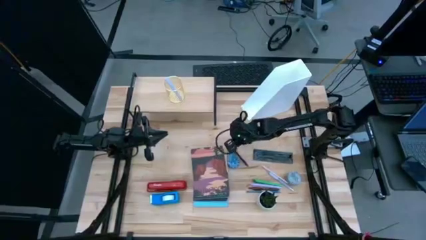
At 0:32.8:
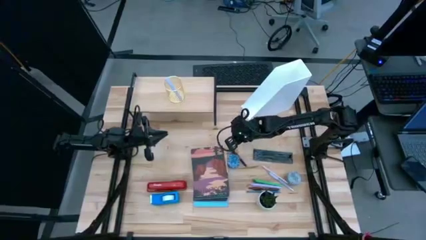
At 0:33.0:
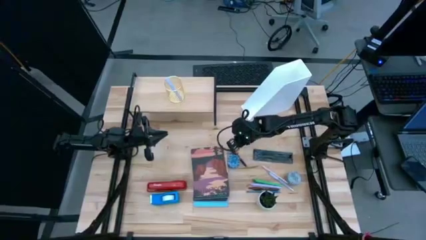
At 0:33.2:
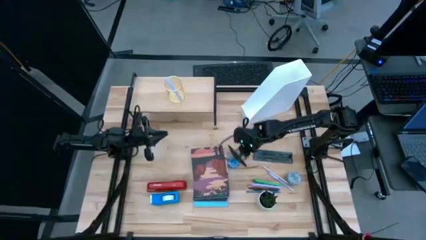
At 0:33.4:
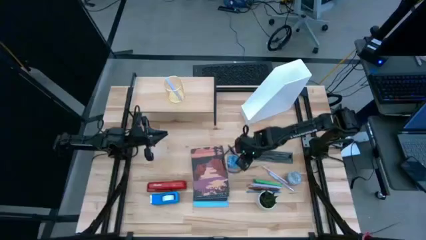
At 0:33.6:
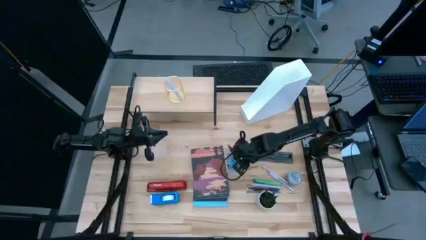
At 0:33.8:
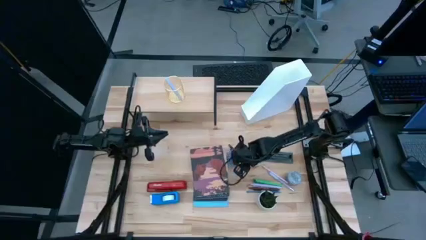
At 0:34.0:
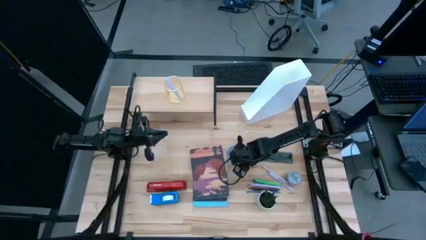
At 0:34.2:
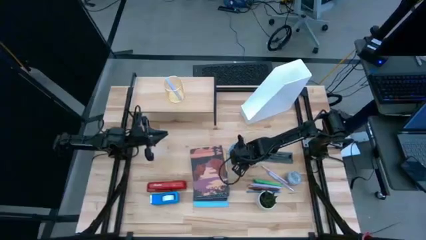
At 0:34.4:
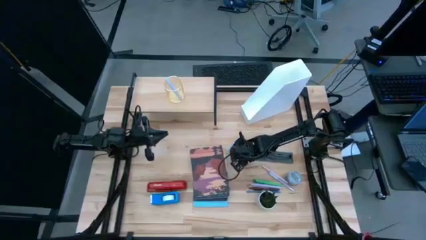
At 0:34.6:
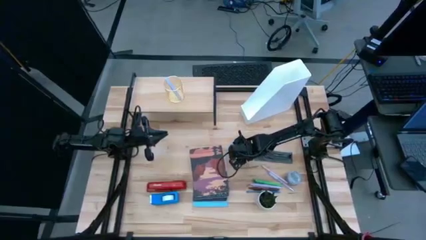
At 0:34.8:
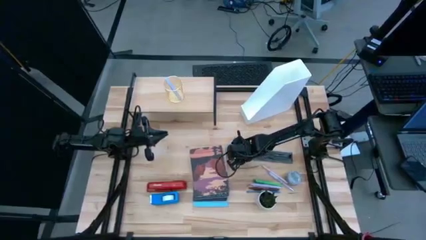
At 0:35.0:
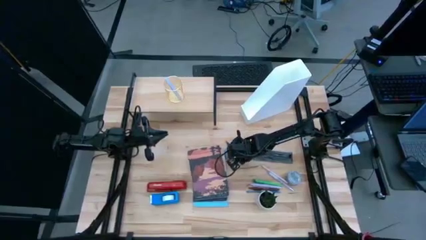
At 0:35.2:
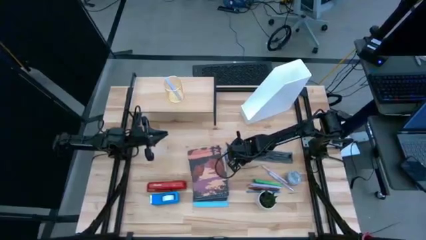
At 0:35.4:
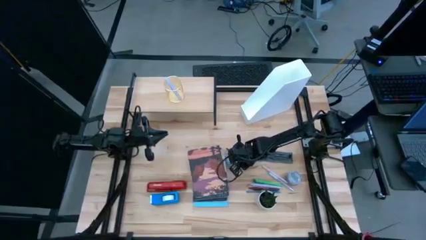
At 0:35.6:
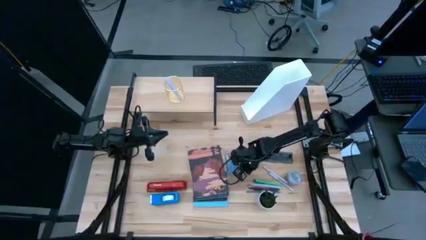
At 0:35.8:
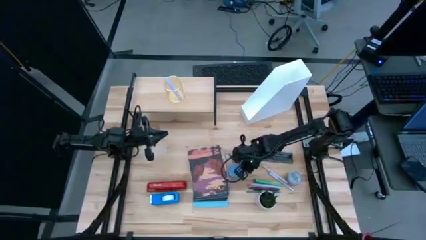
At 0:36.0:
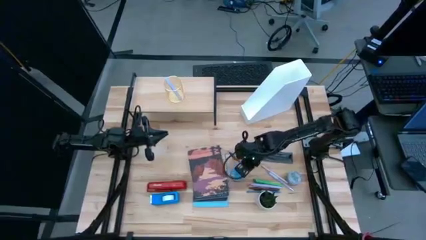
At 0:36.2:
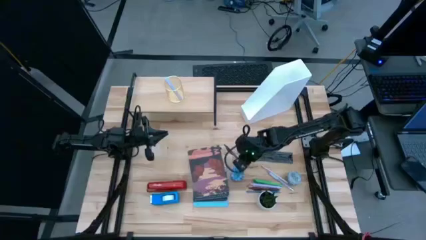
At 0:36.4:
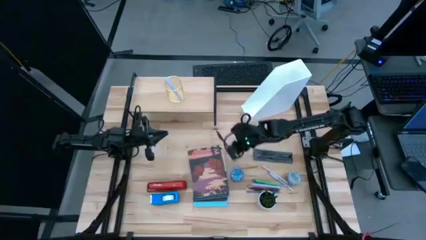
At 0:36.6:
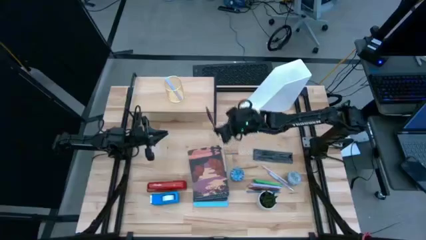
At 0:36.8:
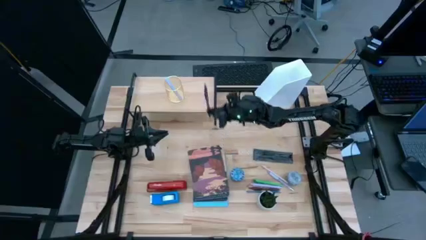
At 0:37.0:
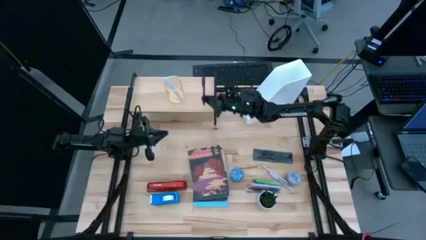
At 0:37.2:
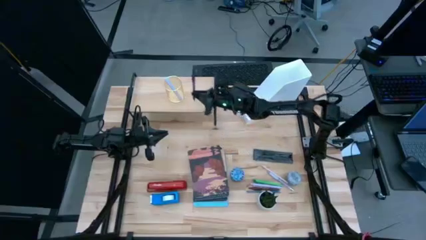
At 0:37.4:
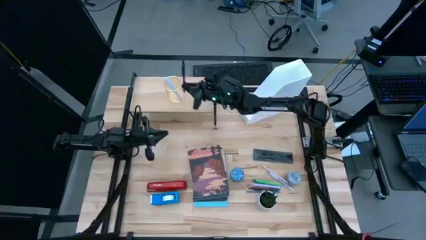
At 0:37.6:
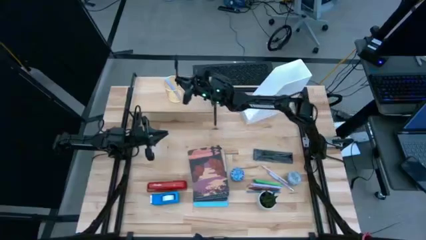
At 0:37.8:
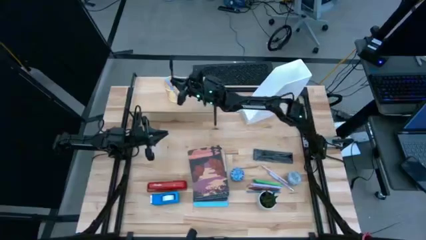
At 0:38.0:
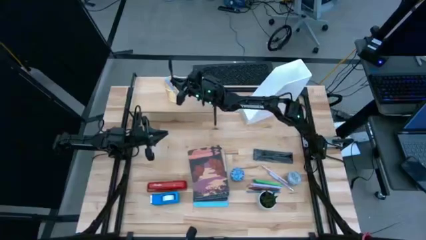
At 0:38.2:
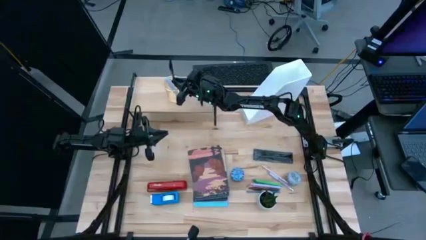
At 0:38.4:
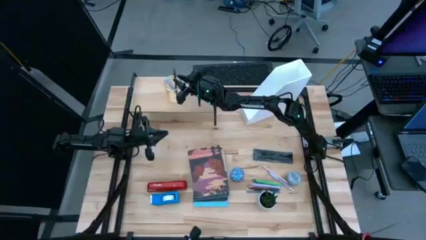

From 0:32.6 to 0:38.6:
Task: Stock shelves
Put the purple pen into the gold pen holder on the shelf

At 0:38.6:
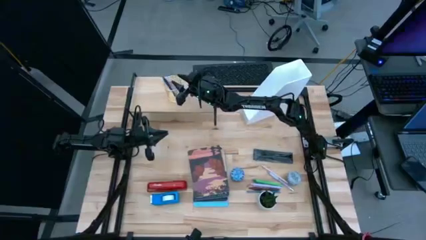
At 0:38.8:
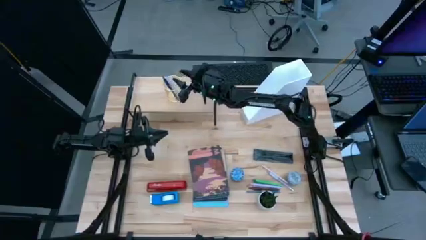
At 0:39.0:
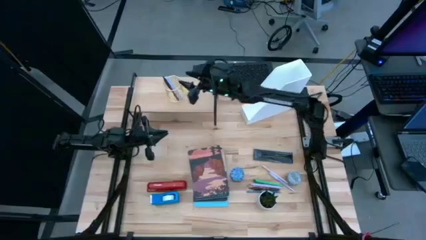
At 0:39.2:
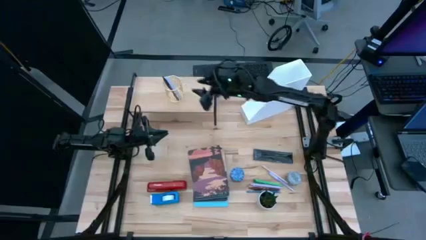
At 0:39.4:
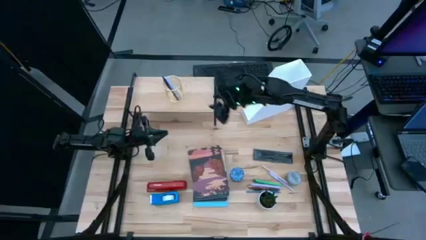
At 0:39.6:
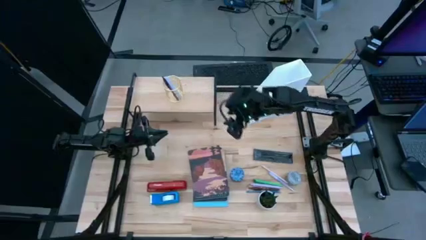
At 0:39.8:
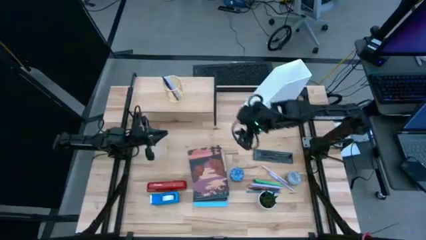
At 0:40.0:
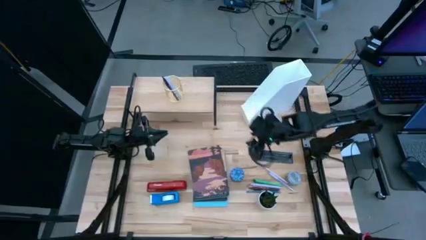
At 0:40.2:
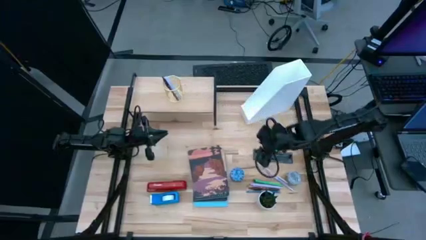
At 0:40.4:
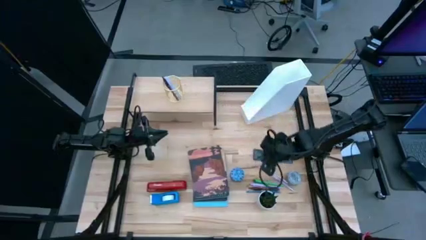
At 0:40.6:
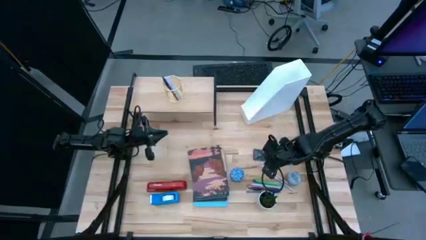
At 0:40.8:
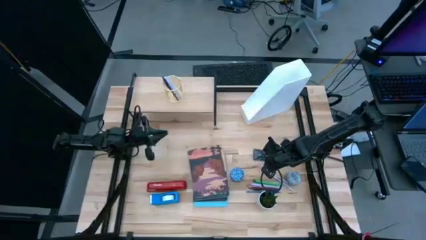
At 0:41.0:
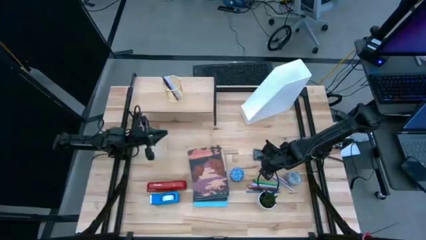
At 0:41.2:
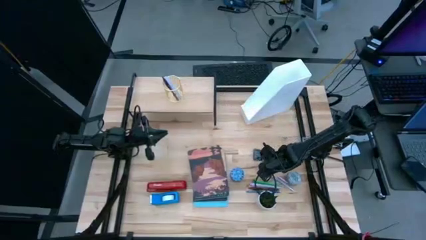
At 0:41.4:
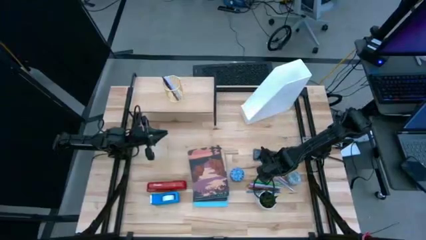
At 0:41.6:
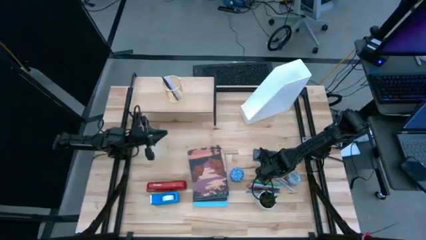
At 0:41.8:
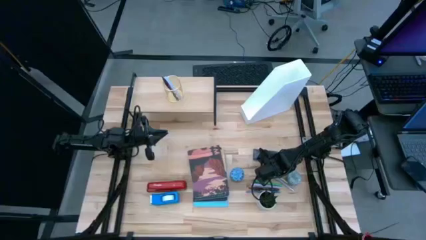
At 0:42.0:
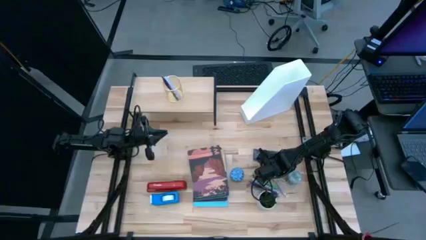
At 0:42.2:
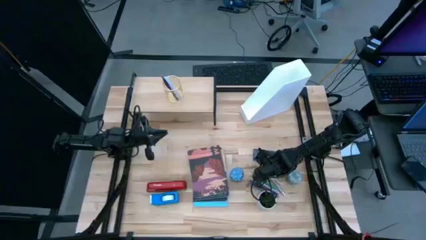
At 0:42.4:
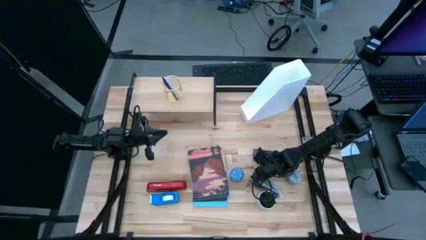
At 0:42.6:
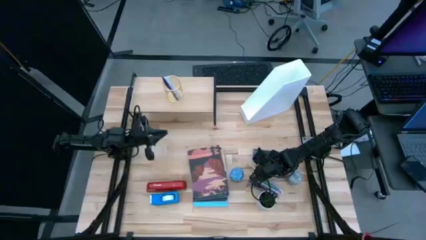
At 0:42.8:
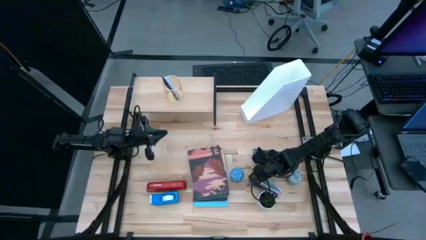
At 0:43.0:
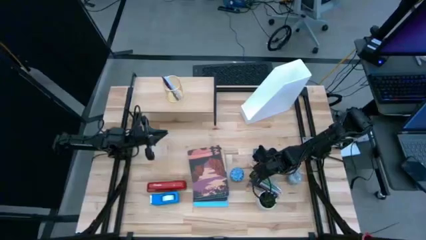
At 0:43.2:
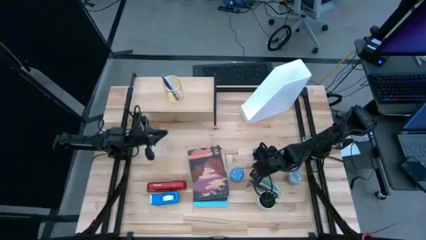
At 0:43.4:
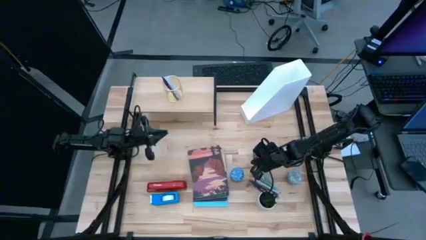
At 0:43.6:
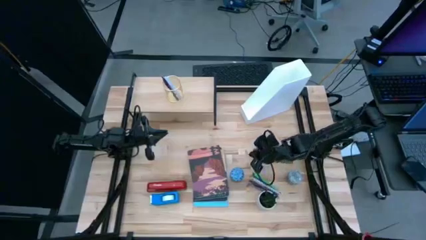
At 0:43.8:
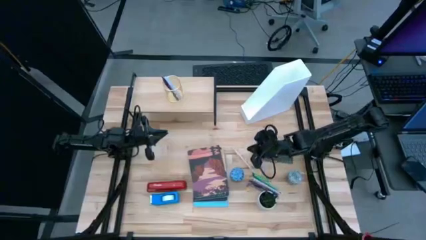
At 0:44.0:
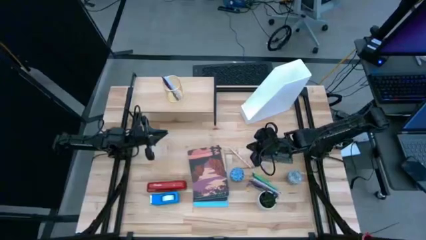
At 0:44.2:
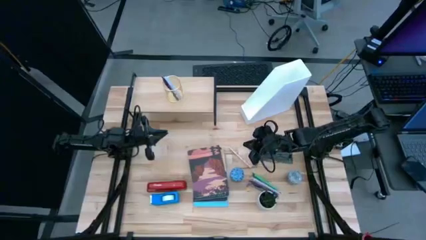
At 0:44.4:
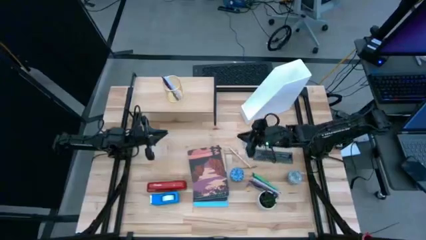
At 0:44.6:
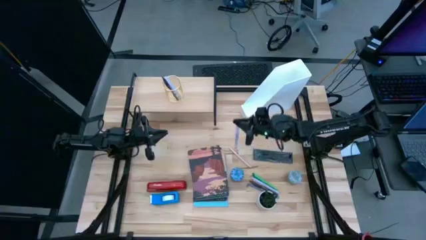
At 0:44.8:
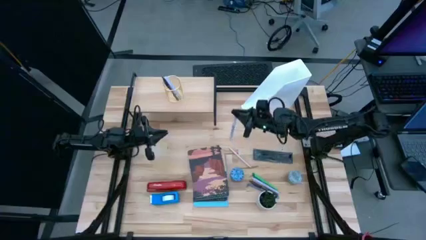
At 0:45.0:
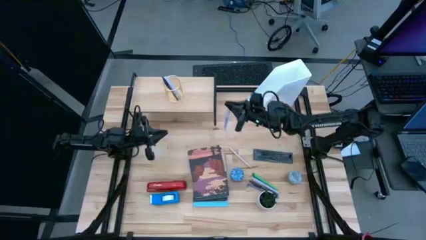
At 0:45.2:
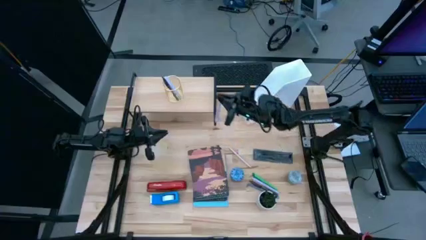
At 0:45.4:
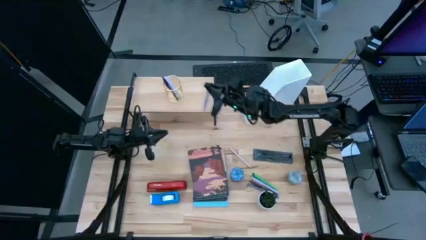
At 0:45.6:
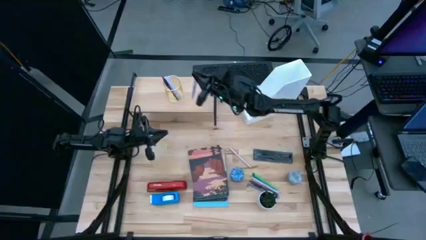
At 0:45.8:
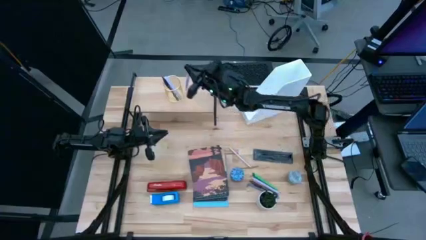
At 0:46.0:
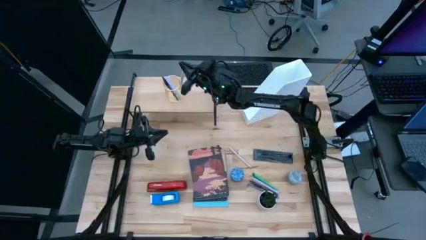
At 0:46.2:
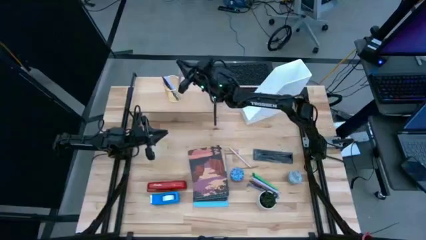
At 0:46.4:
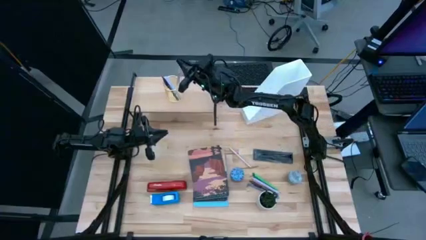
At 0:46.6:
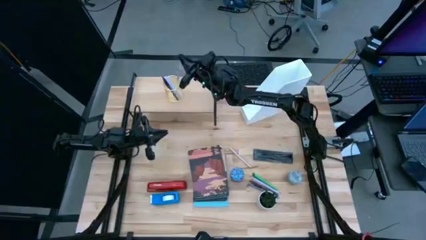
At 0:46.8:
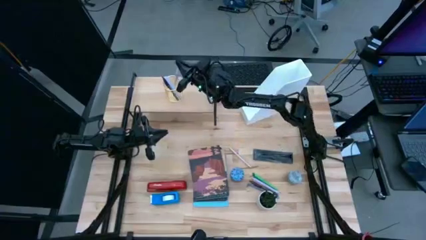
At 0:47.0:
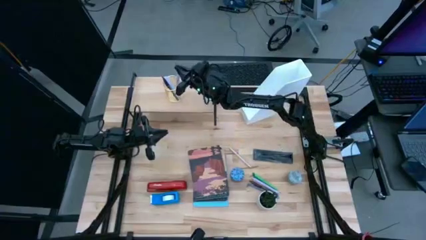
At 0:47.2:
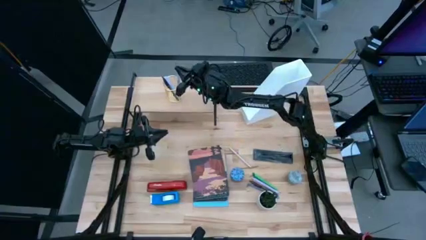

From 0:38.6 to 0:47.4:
Put the purple pen into the gold pen holder on the shelf

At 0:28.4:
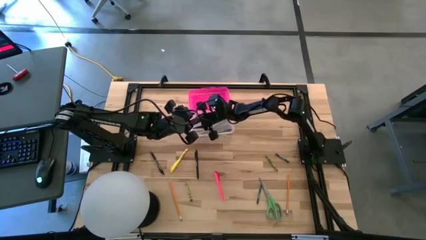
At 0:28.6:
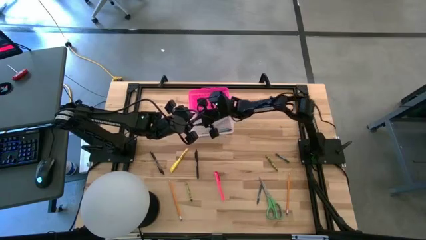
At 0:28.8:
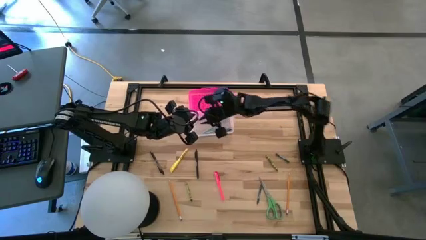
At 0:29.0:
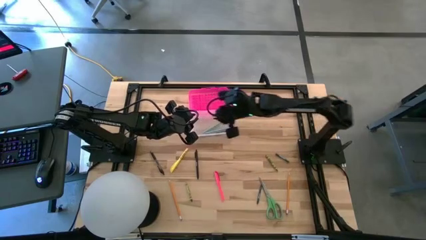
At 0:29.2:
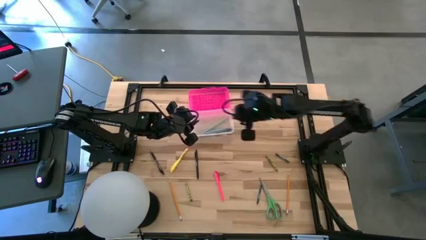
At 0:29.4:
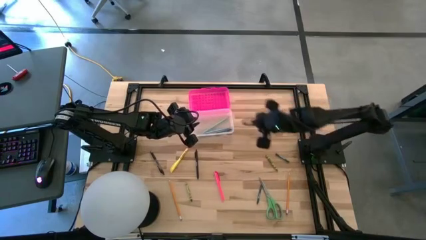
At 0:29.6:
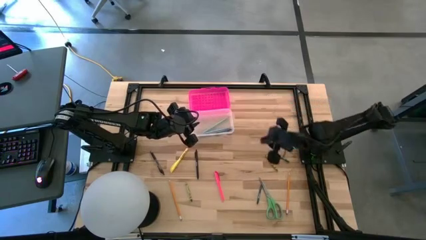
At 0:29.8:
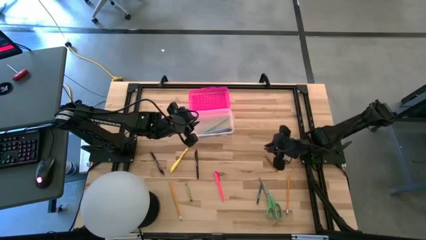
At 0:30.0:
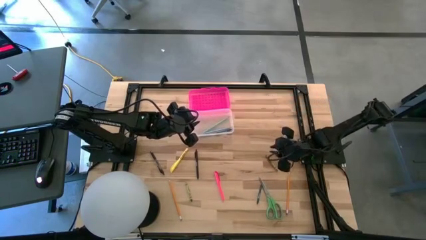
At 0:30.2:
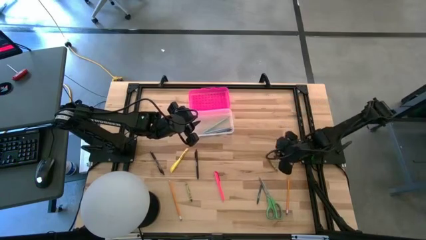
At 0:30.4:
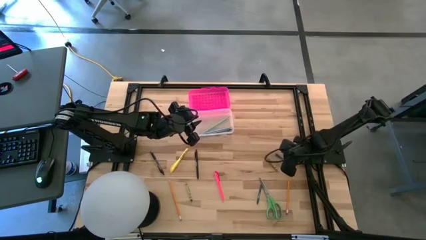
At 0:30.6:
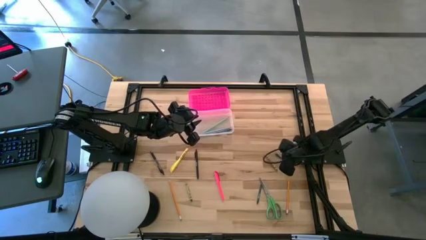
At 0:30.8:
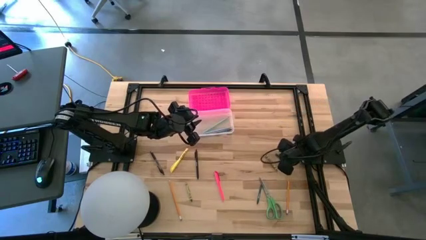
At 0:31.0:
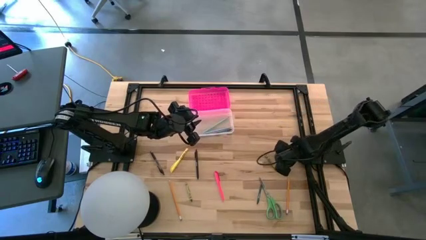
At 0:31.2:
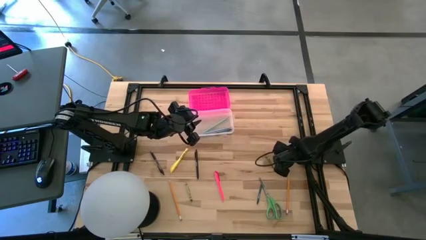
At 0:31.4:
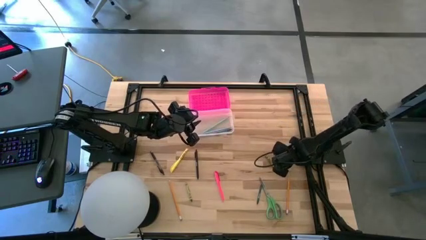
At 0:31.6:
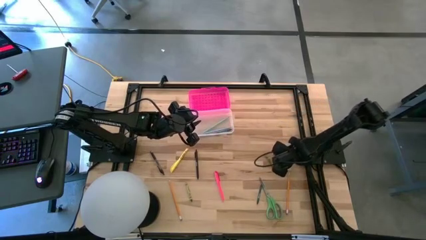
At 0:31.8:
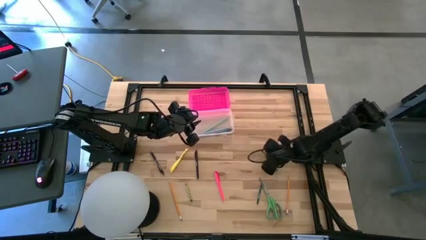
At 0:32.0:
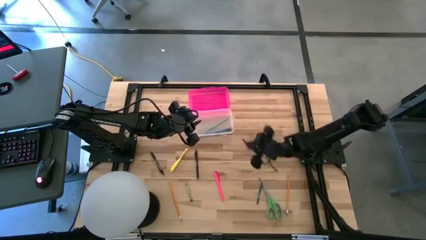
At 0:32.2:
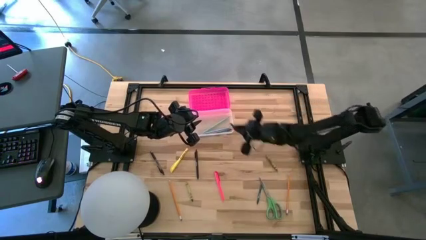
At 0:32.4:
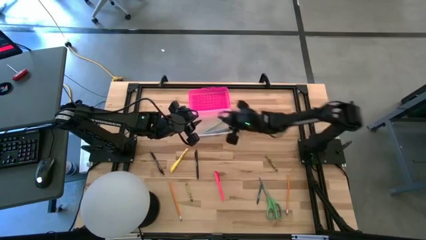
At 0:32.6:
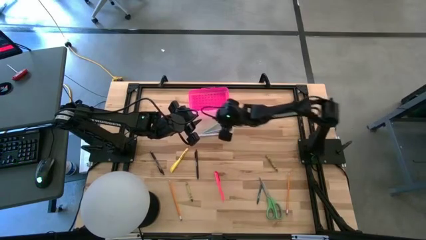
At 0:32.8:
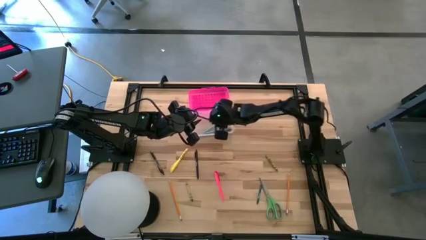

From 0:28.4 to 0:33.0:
Task: Pick & place school supplies into a supply box
Put the dark green crayon into the pink supply box
